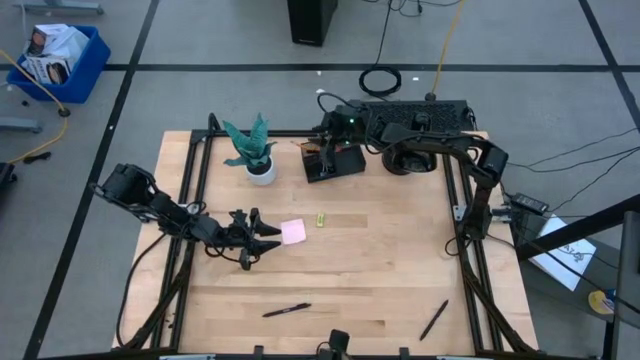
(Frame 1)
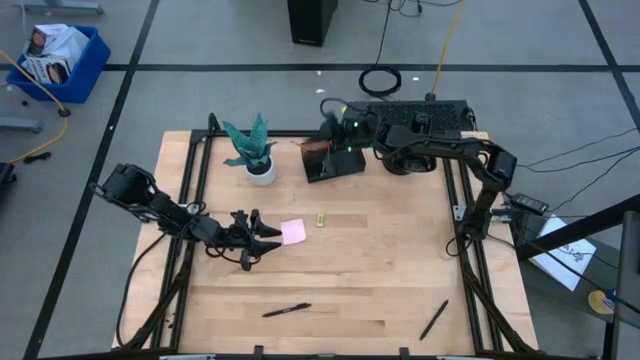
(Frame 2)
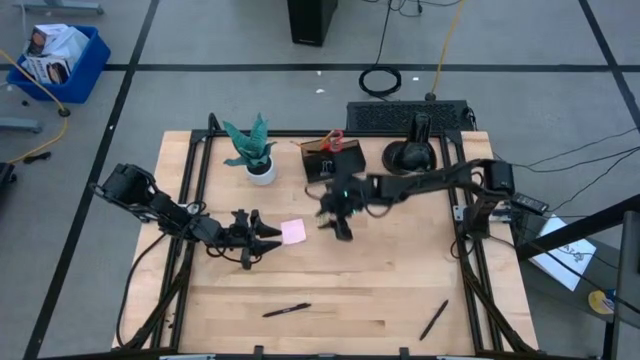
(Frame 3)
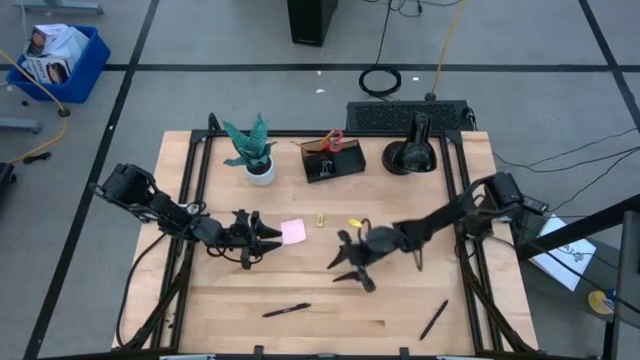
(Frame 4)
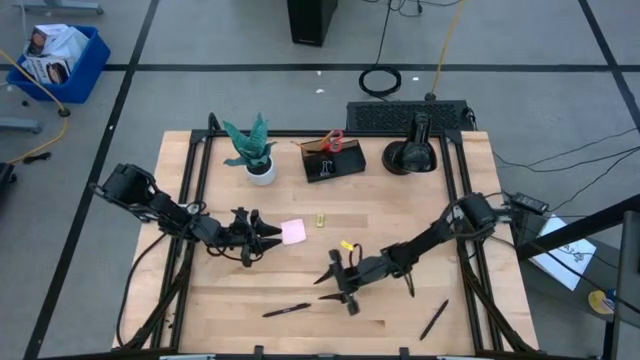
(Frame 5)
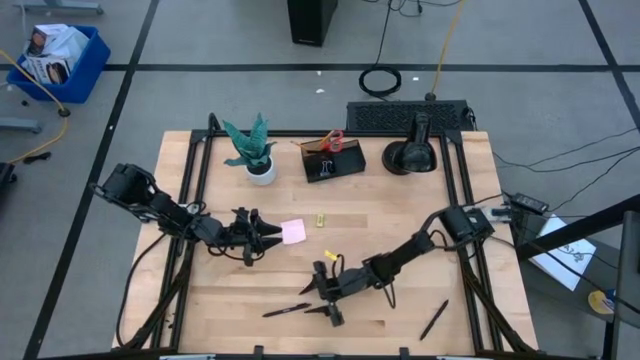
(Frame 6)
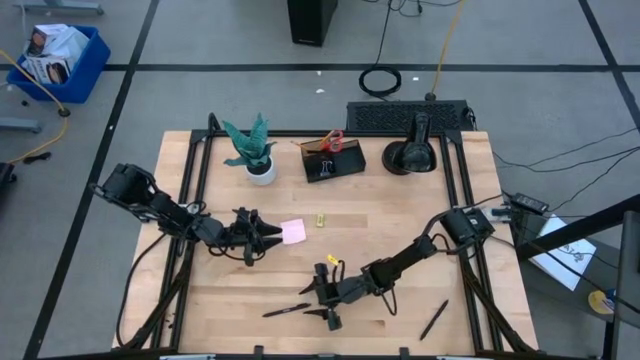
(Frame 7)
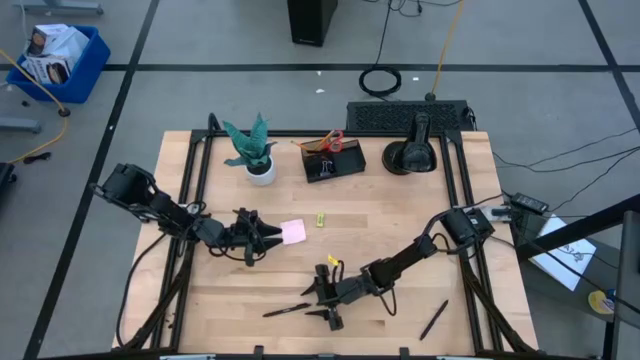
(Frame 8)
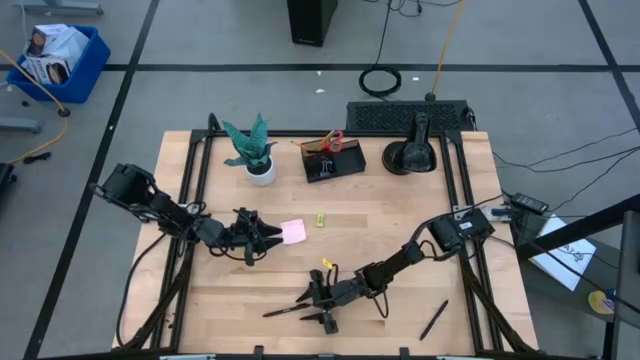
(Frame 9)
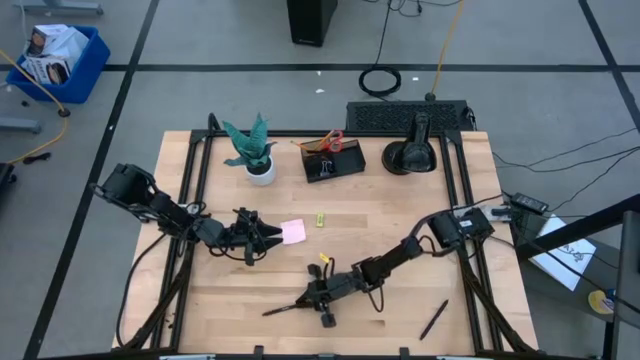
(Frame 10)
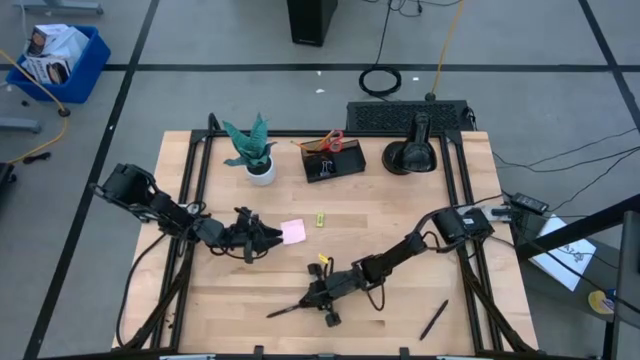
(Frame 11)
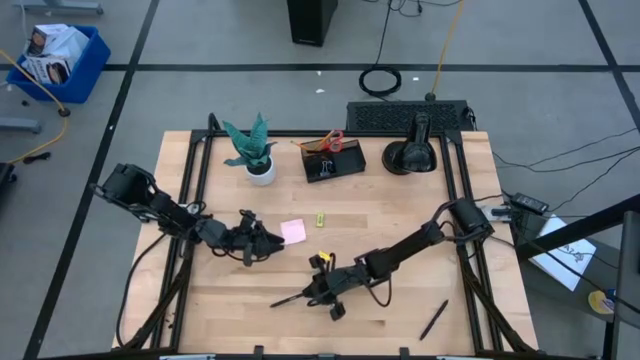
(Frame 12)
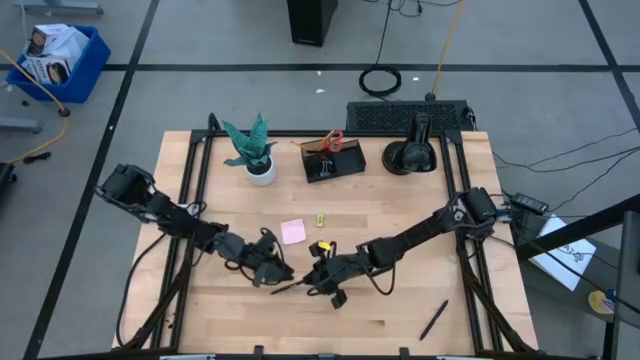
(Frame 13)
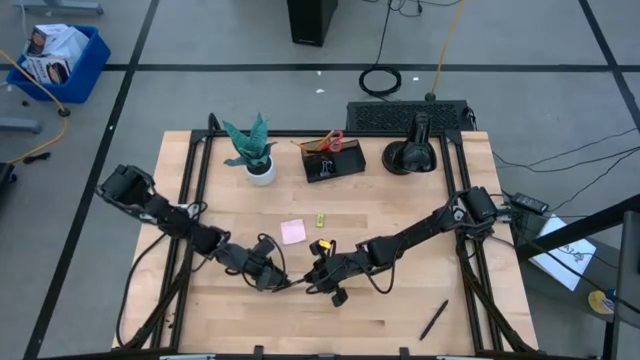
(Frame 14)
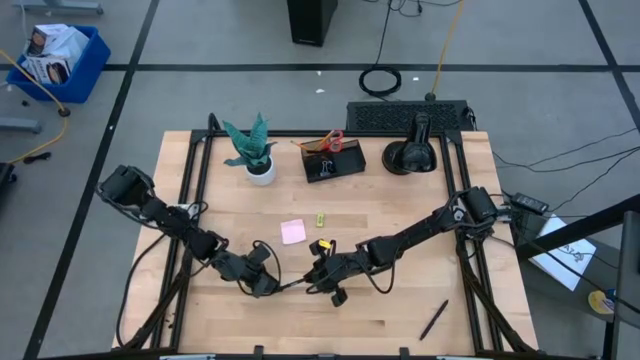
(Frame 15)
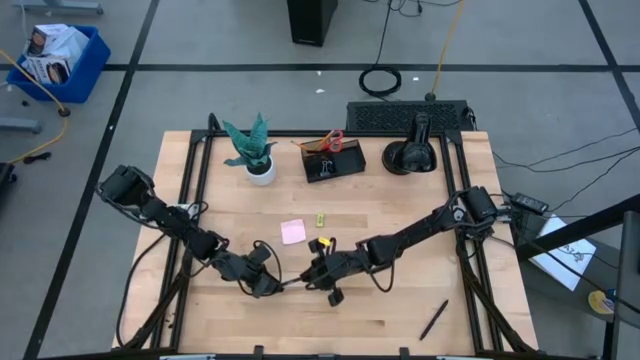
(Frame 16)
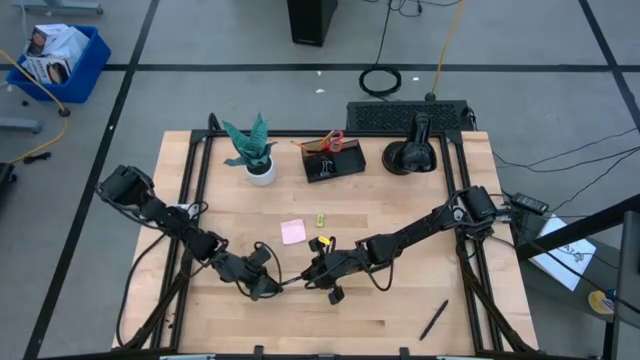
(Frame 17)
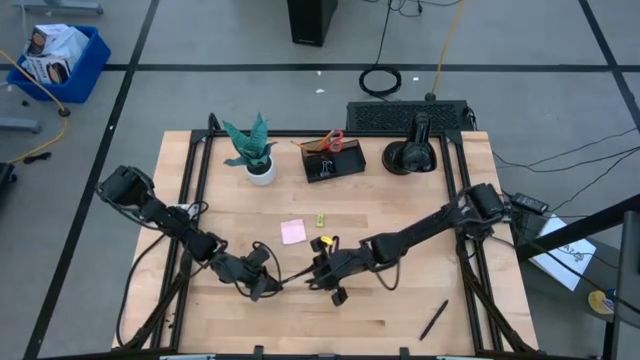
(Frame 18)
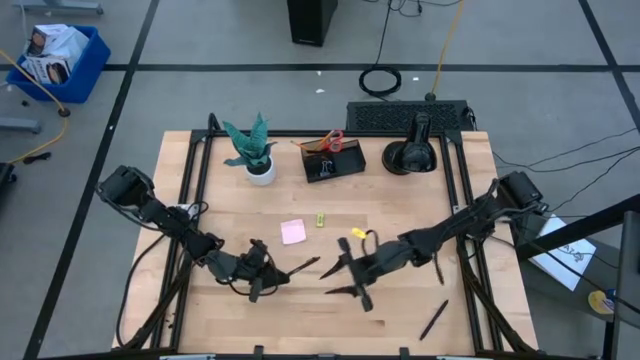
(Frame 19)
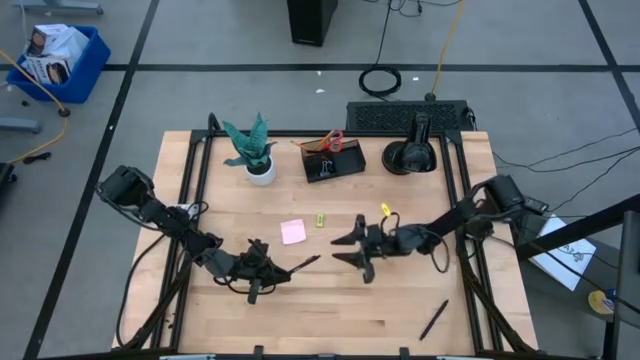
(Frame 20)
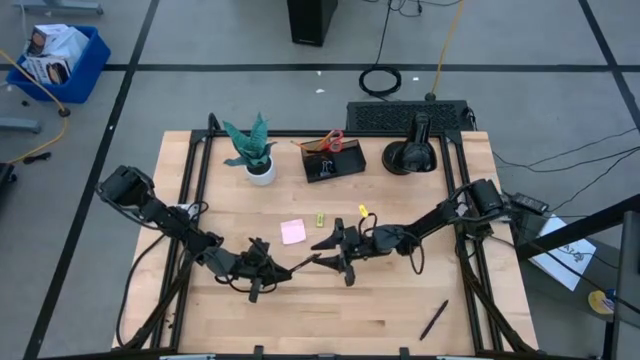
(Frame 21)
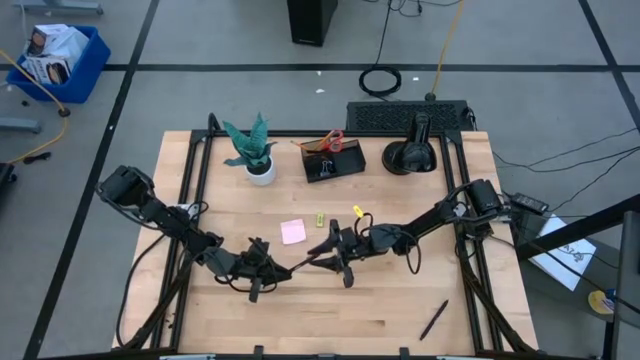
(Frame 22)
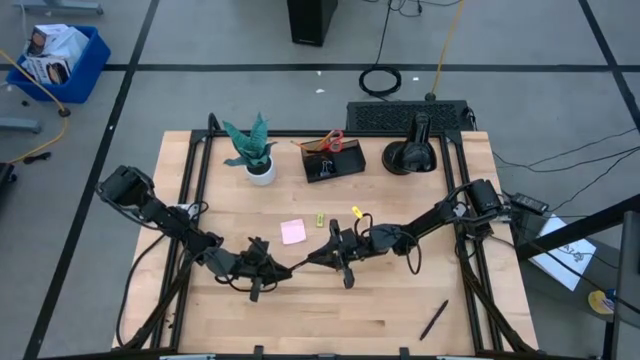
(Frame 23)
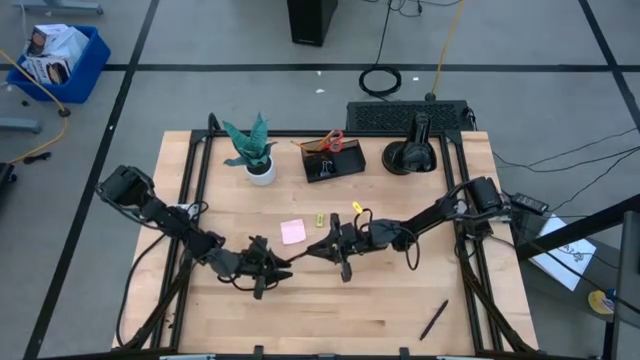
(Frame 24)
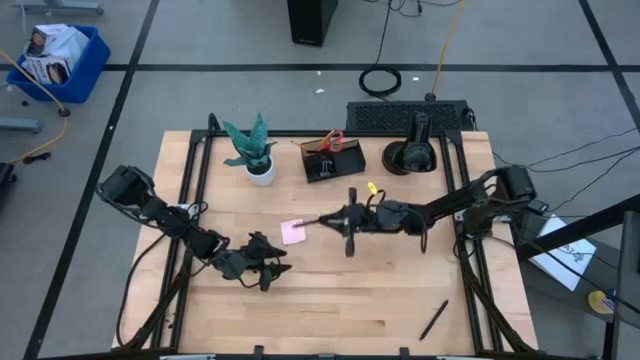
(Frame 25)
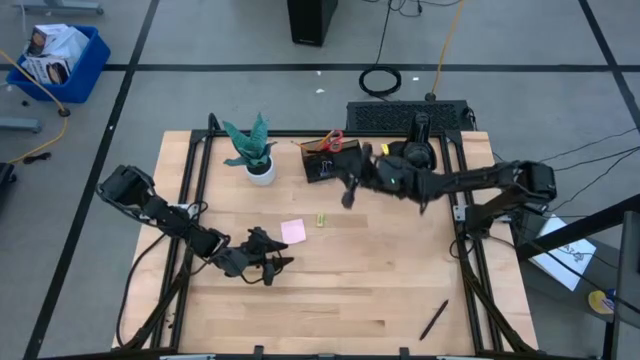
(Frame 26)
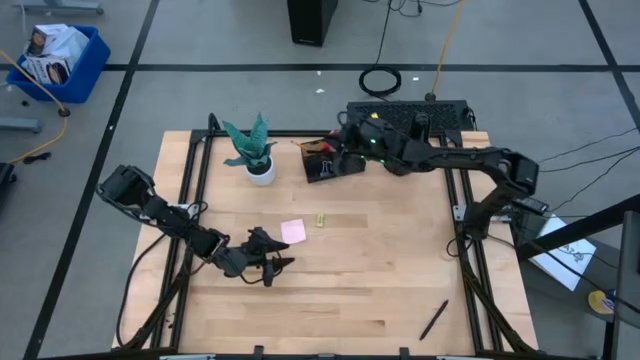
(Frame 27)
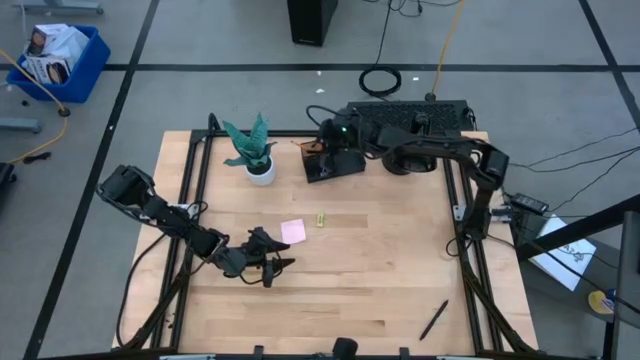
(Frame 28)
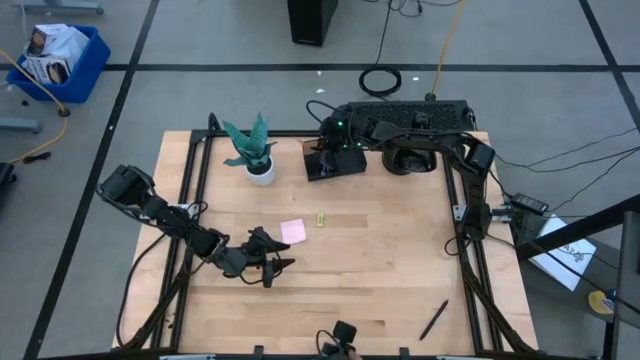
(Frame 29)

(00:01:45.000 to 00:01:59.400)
Task: Pick and place office supplies into organizer
Put the black pen into the black mesh desk organizer

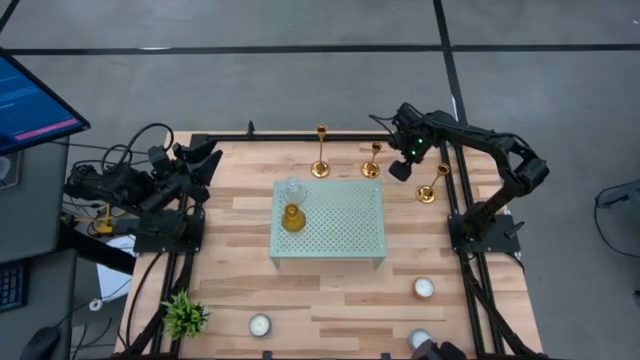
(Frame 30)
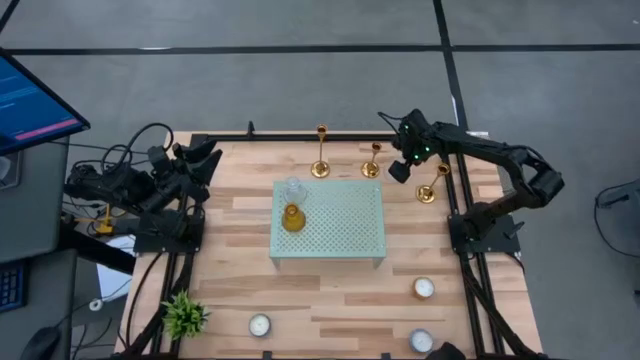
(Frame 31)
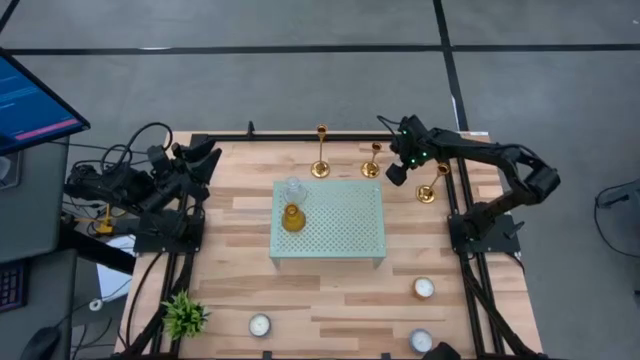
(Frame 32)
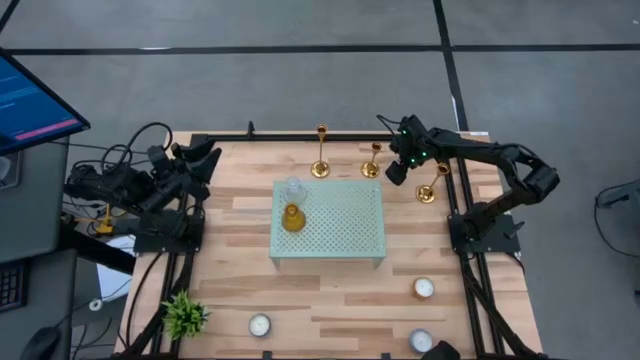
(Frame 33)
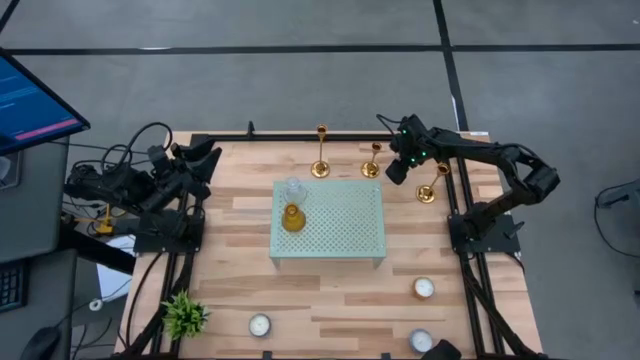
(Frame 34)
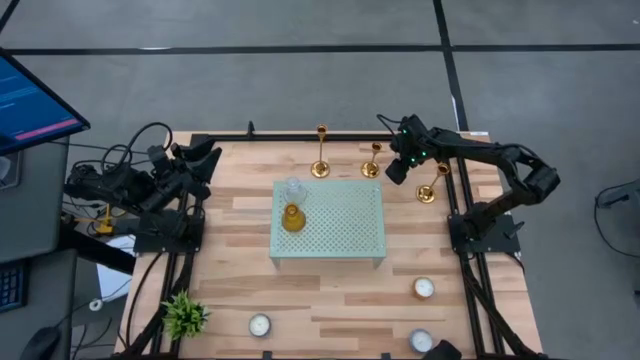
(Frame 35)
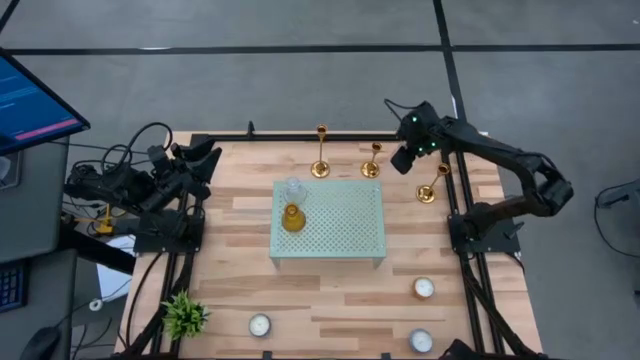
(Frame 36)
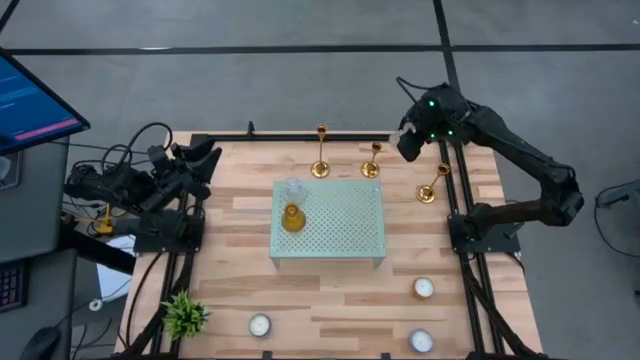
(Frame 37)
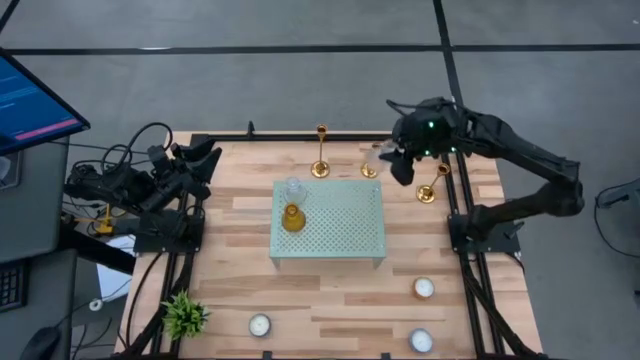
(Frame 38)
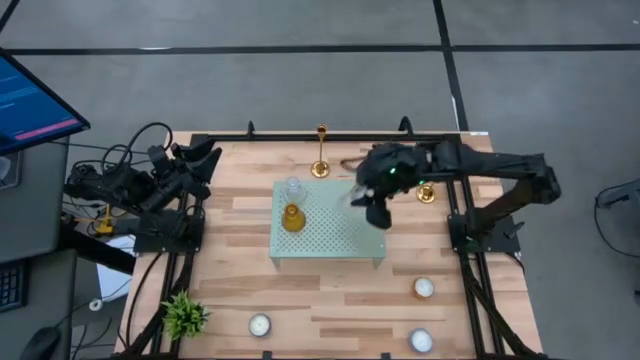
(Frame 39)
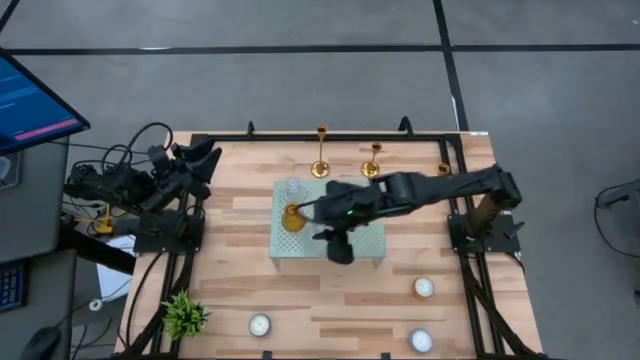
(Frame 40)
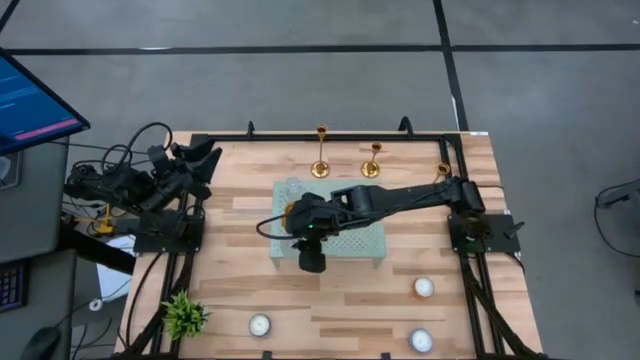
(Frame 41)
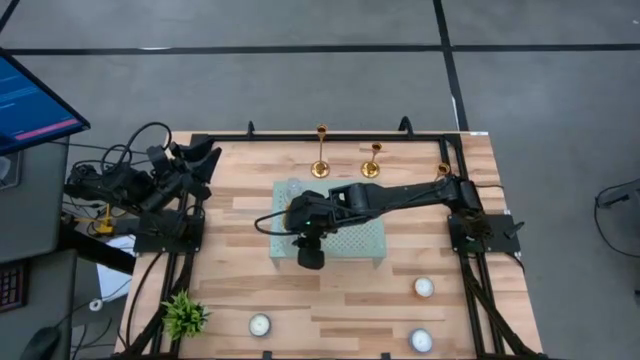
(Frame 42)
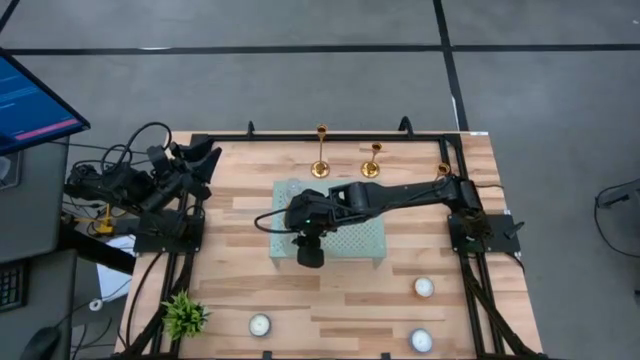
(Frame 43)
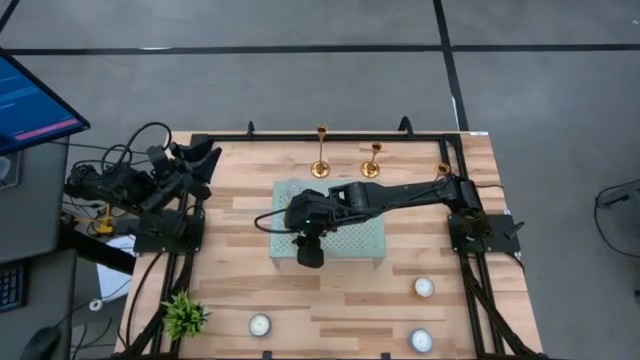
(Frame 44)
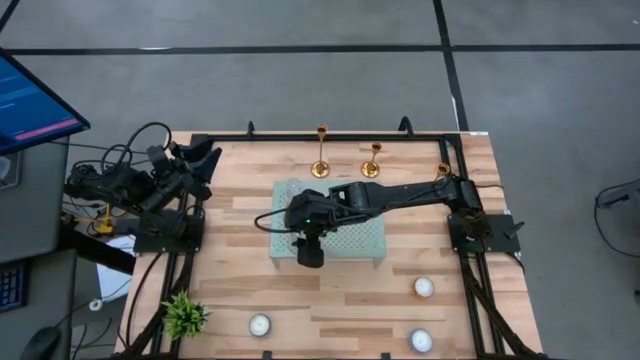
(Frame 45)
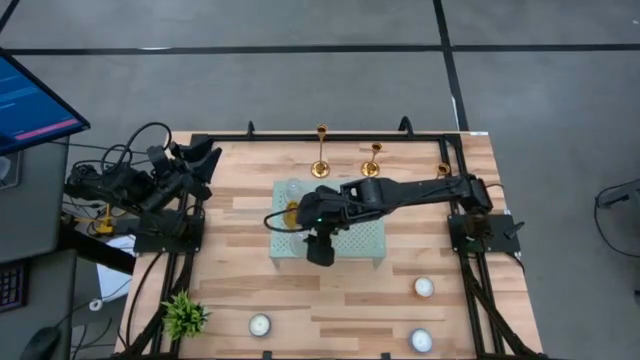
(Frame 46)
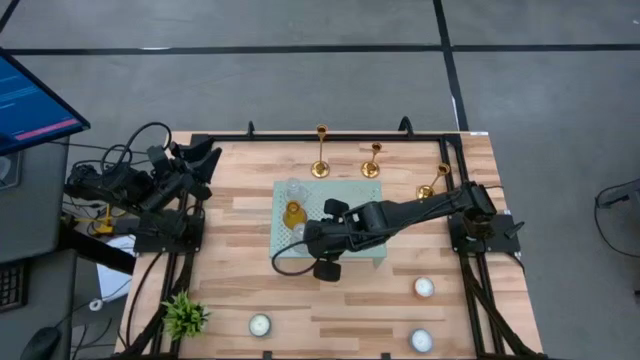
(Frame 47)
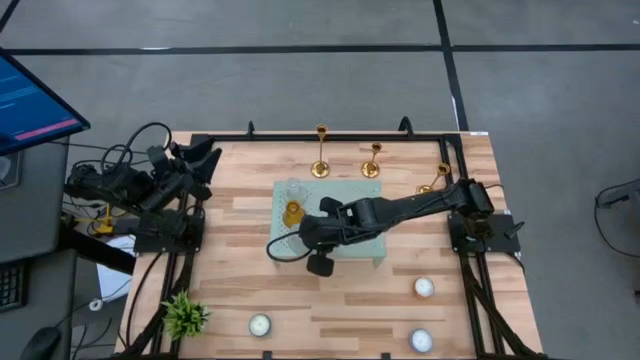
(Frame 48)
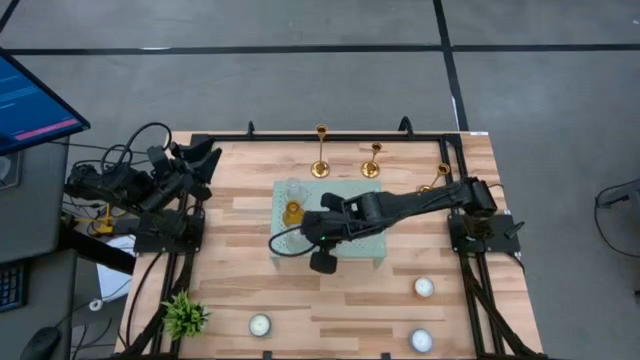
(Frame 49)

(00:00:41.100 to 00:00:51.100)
Task: Pick & Place candle stick holders
Put the transparent glass candle holder on the shelf
